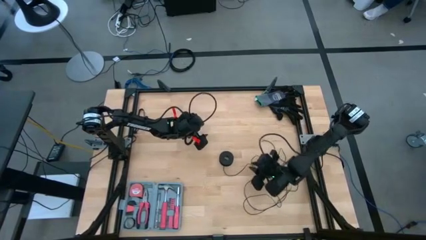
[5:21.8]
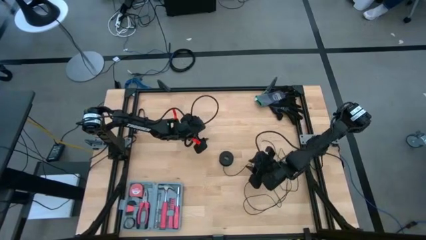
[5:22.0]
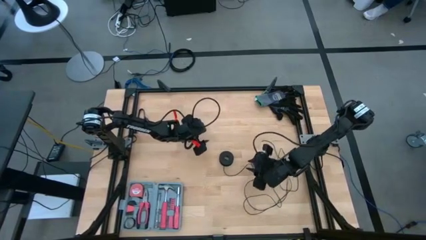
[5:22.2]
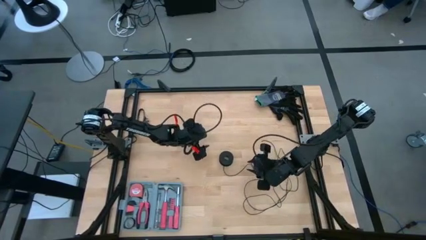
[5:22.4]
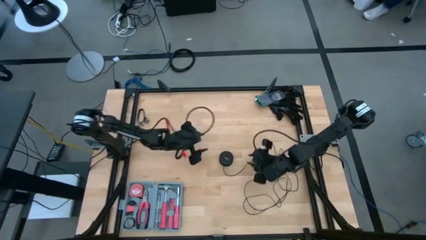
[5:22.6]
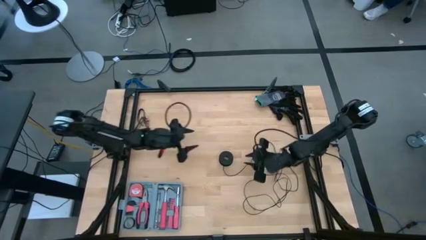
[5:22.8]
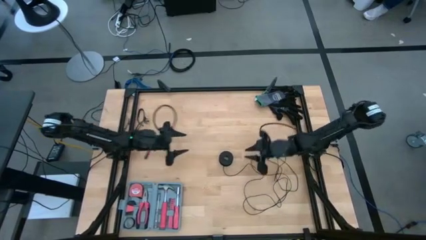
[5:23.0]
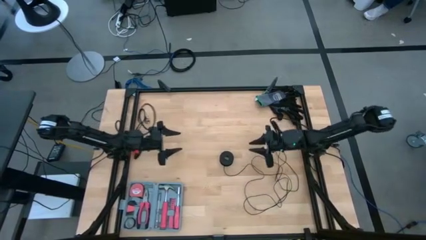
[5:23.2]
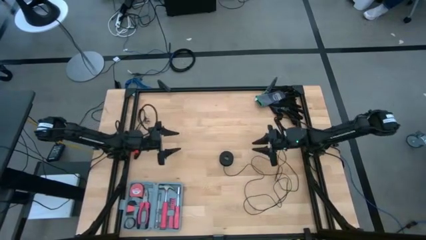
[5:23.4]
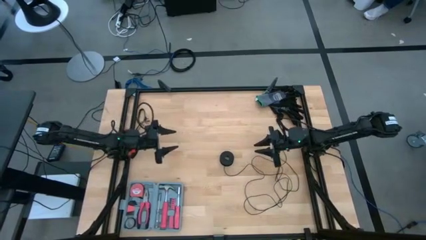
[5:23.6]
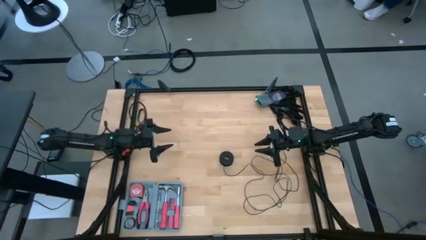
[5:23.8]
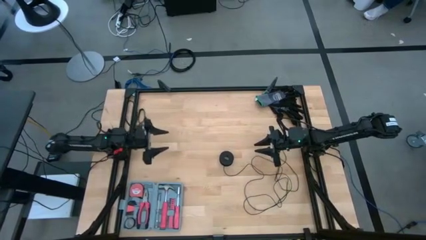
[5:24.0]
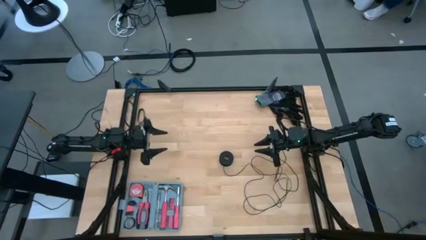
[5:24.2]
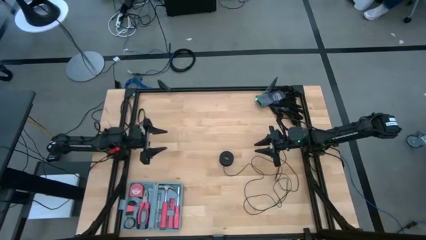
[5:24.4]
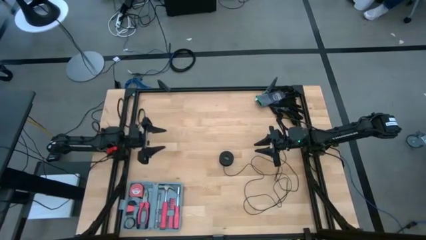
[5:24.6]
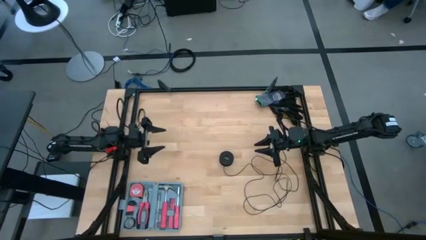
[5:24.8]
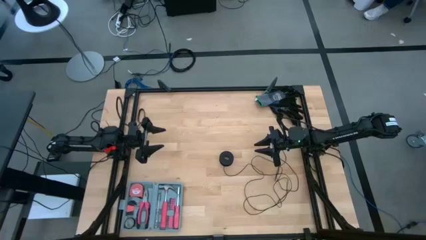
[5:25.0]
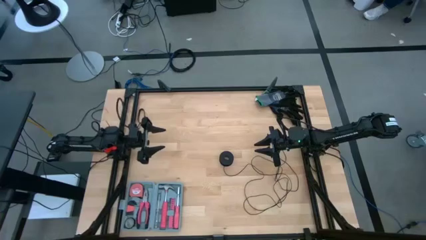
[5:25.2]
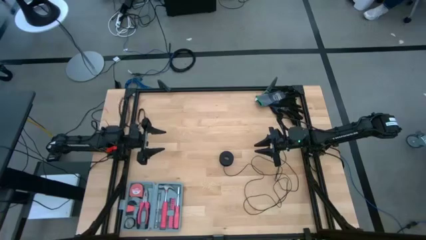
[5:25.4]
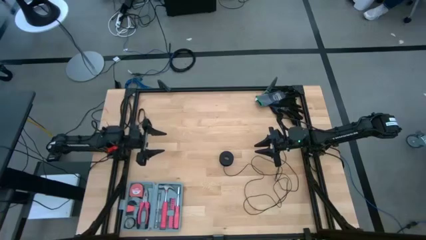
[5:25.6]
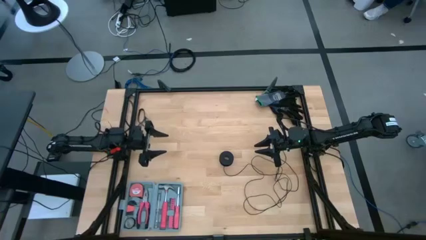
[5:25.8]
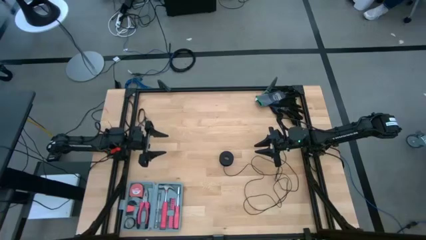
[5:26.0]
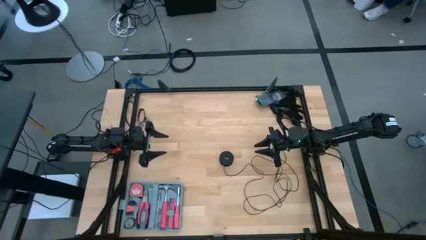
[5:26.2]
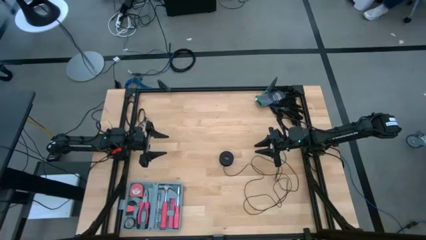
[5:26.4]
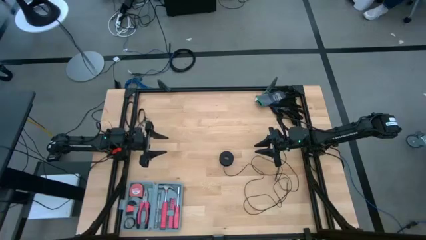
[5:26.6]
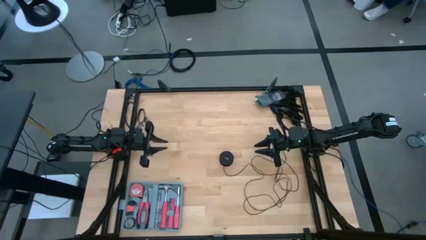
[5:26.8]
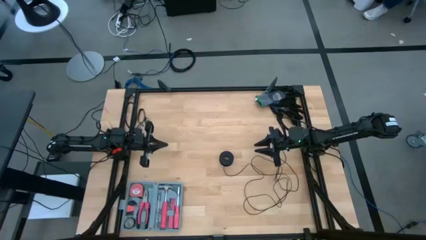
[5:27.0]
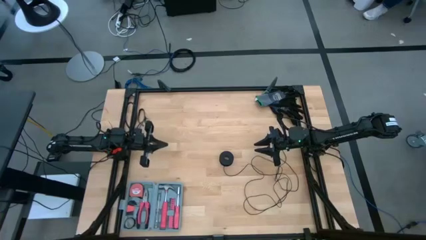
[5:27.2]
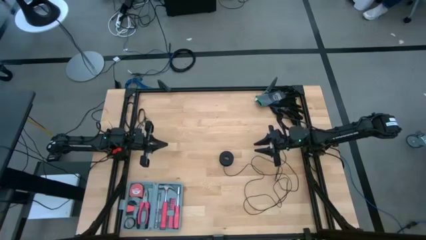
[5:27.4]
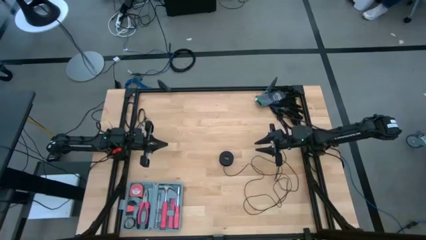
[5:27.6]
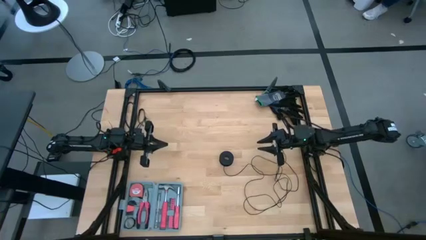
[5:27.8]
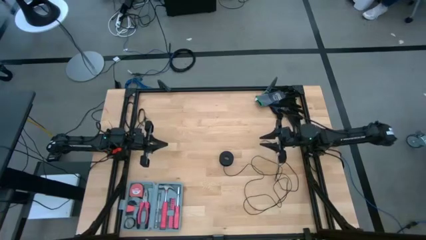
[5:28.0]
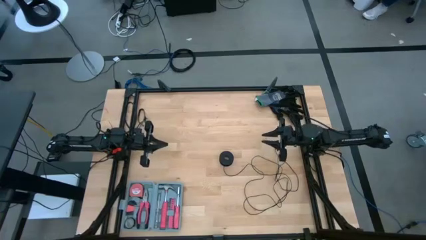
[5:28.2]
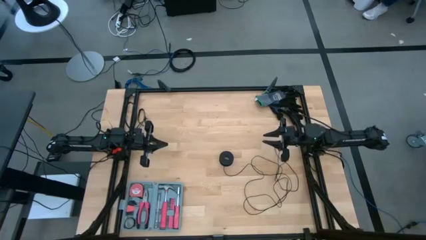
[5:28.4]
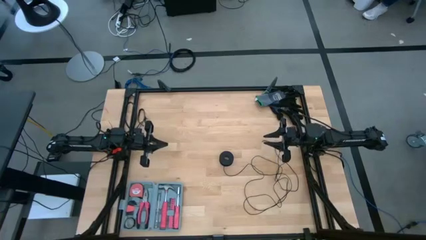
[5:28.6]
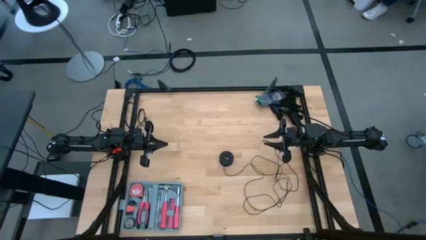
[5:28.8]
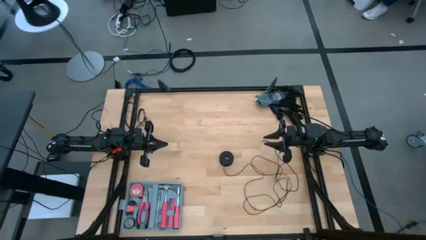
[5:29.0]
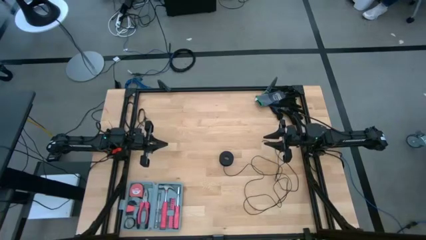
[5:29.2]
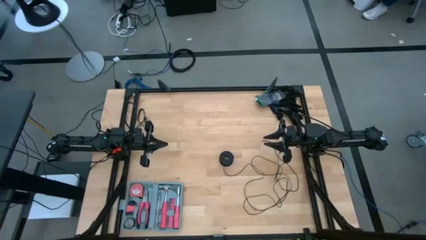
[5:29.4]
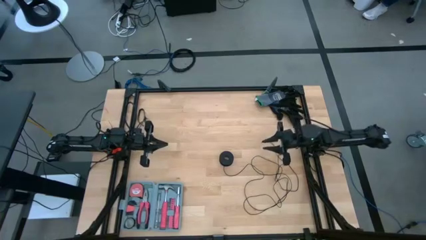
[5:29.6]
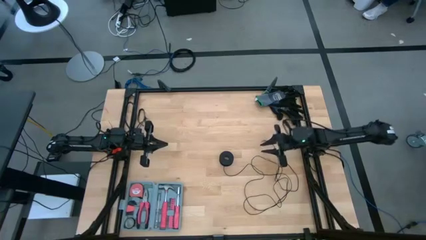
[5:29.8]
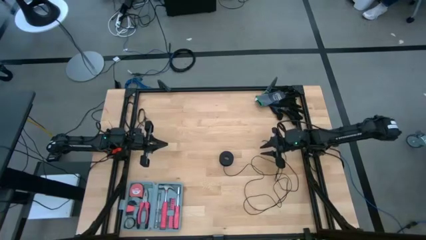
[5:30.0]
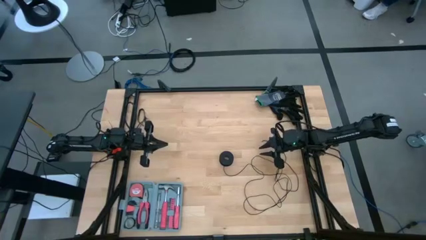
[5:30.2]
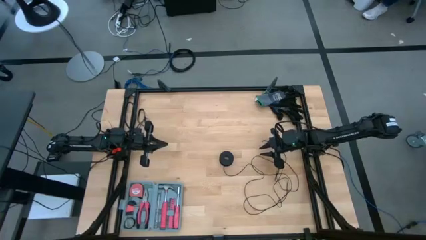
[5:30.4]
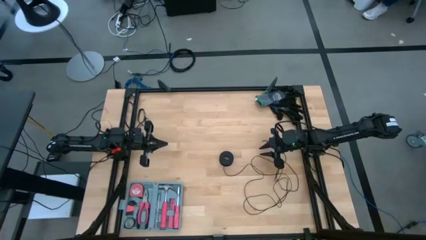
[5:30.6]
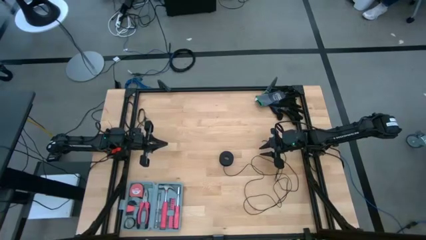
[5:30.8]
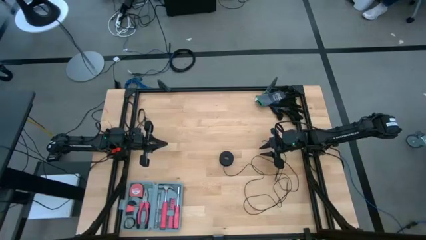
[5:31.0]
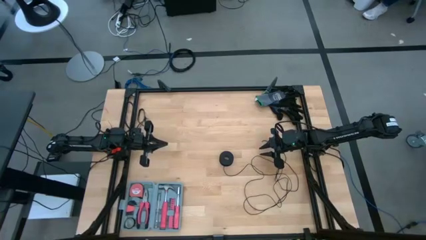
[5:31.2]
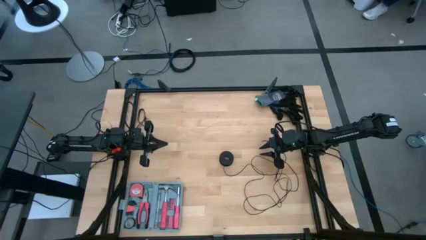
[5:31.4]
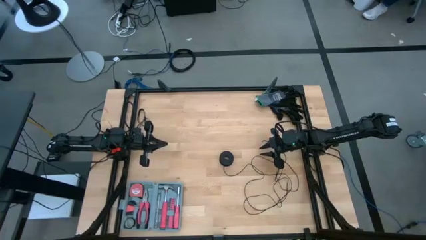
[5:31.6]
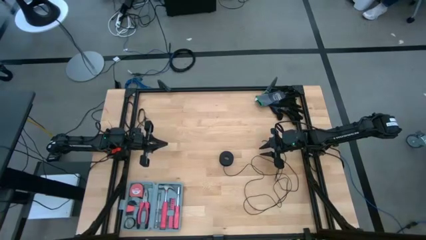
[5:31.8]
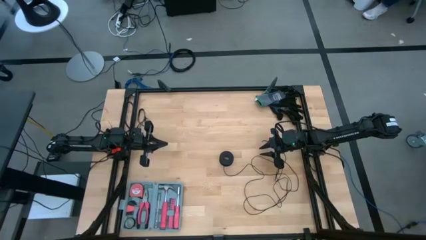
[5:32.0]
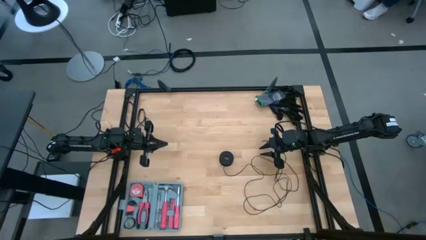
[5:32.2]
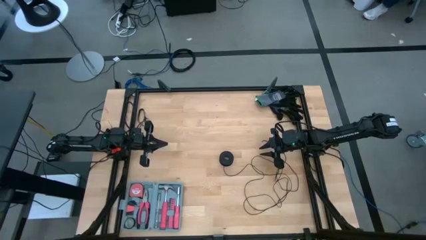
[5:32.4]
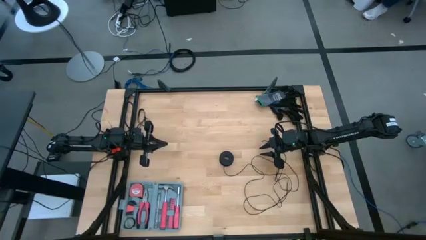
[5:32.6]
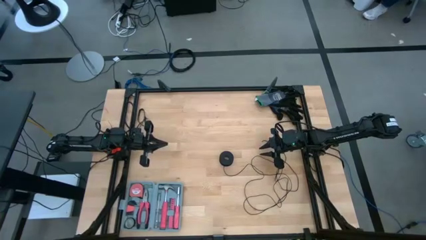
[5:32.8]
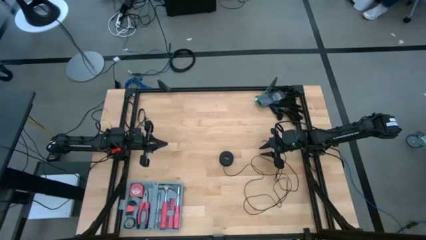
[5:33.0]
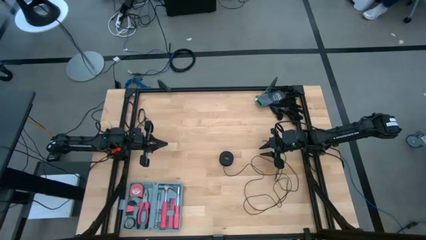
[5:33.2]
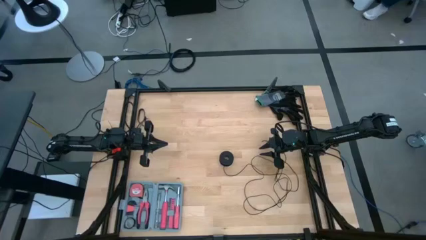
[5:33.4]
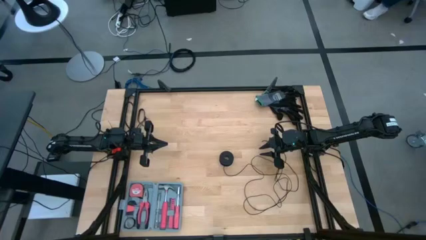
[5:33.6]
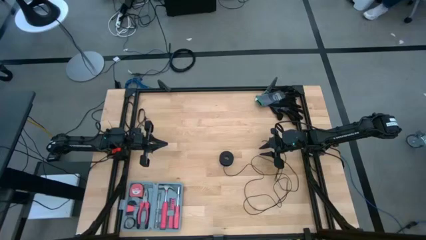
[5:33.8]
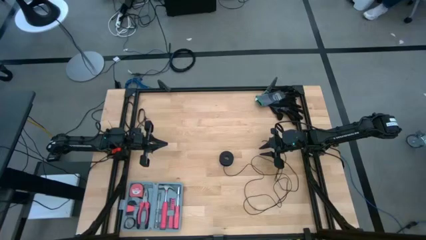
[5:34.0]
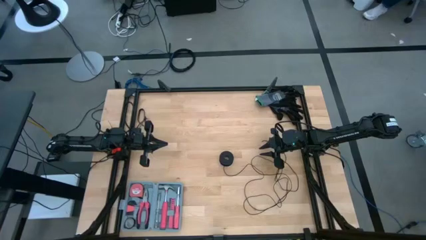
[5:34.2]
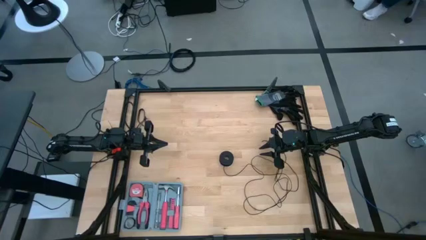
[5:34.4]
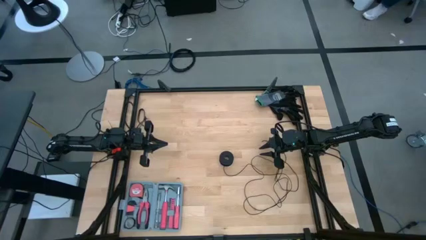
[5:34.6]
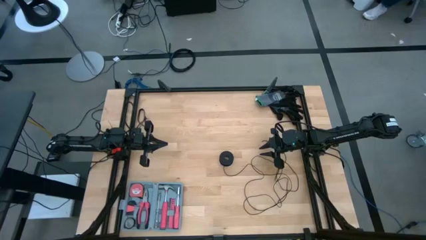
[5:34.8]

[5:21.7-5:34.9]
Task: Coil cords
Return to Home Position
